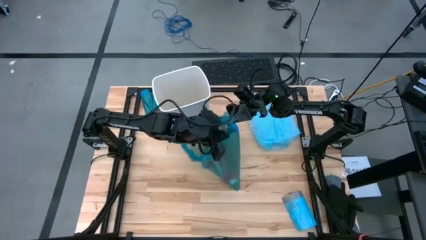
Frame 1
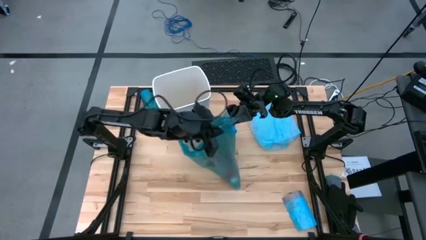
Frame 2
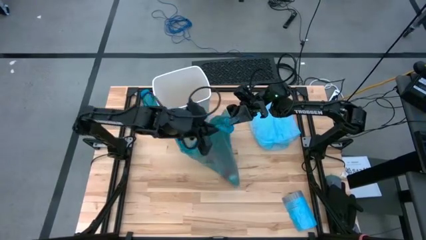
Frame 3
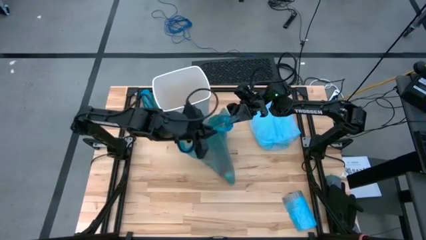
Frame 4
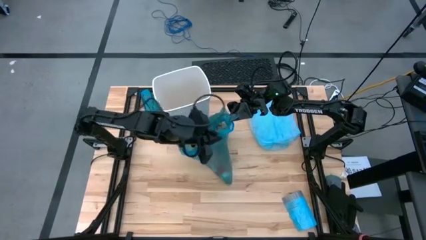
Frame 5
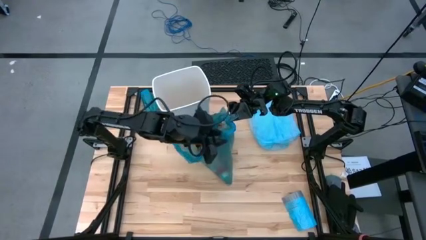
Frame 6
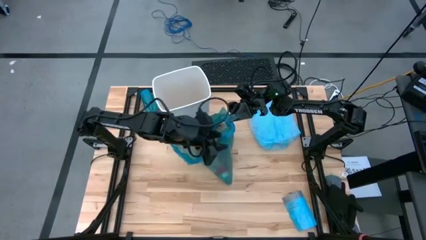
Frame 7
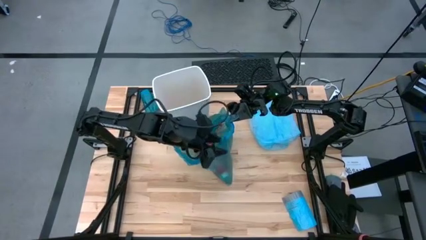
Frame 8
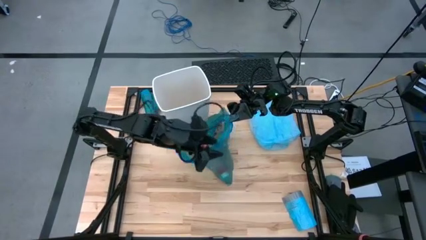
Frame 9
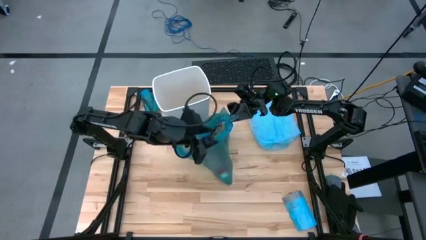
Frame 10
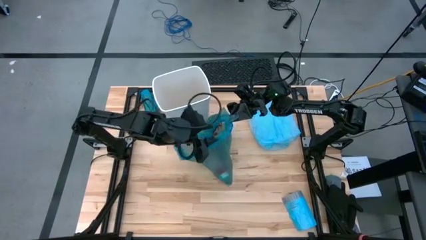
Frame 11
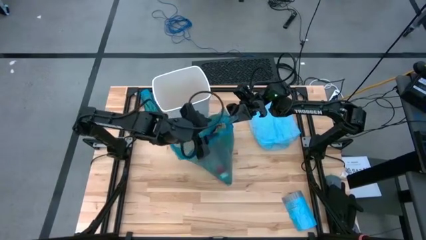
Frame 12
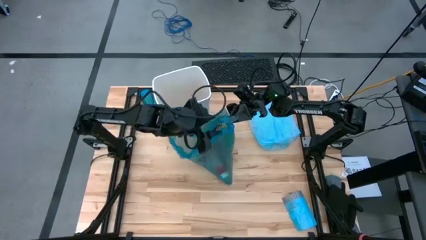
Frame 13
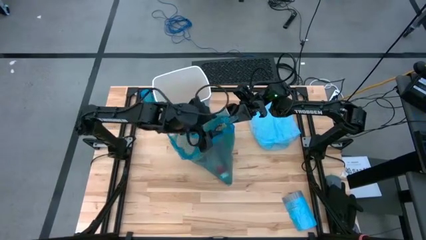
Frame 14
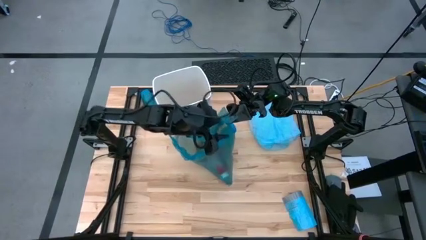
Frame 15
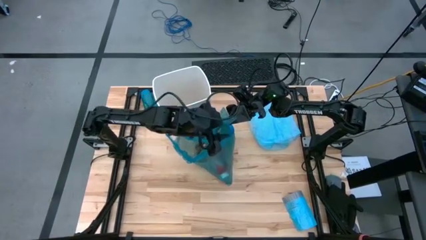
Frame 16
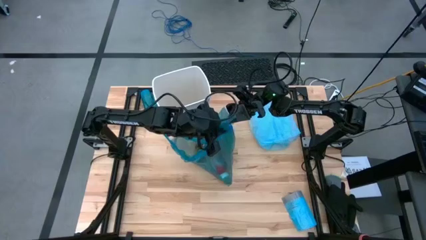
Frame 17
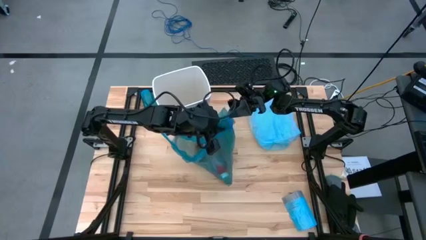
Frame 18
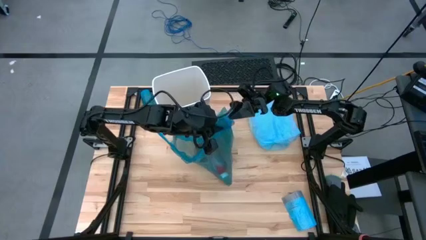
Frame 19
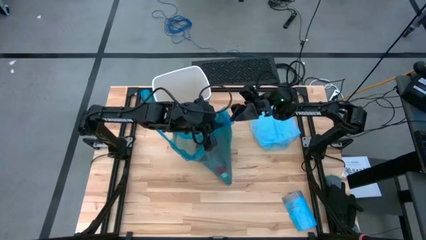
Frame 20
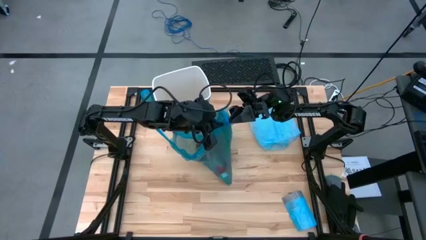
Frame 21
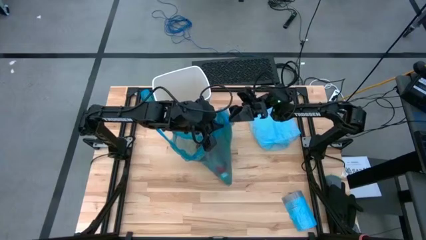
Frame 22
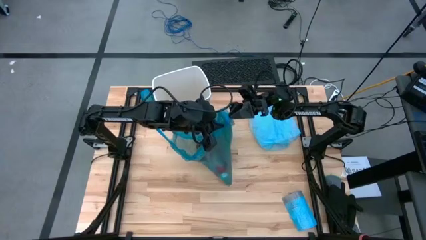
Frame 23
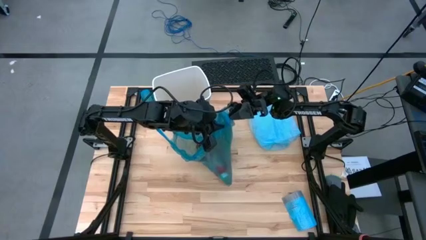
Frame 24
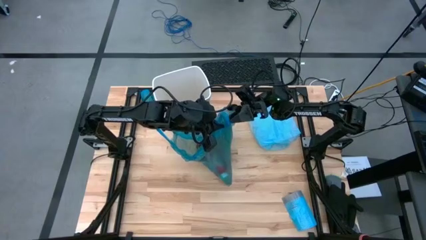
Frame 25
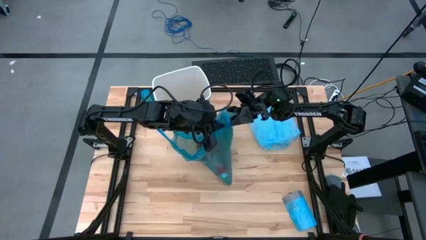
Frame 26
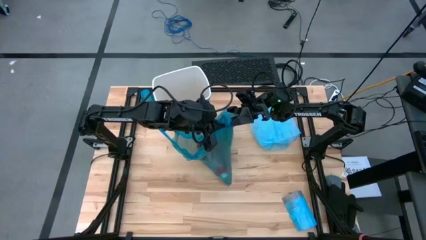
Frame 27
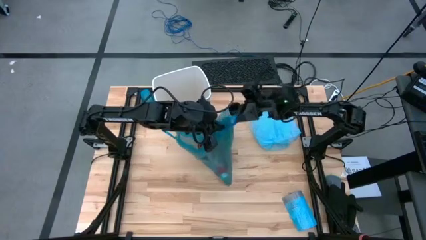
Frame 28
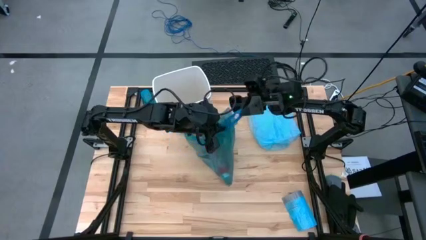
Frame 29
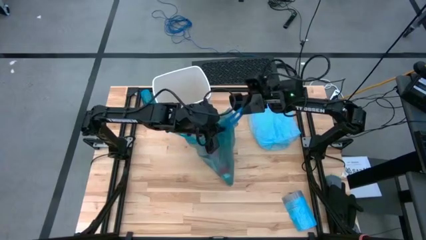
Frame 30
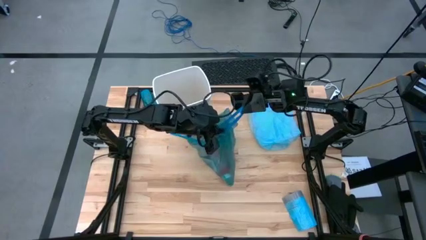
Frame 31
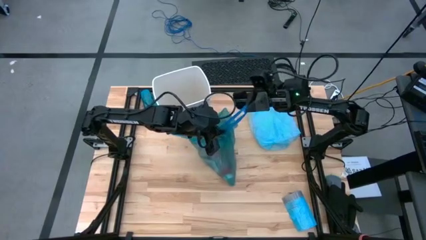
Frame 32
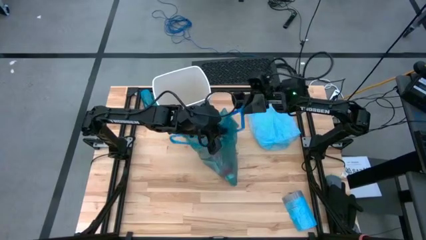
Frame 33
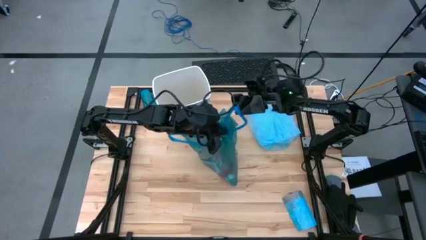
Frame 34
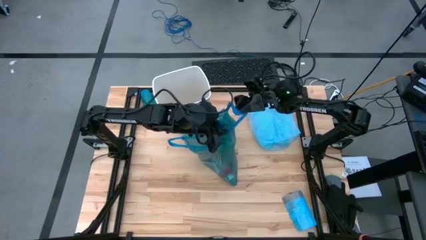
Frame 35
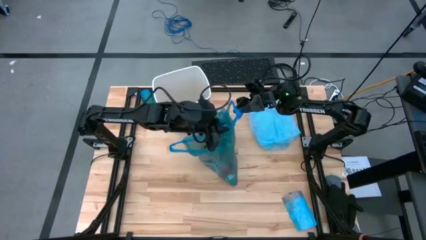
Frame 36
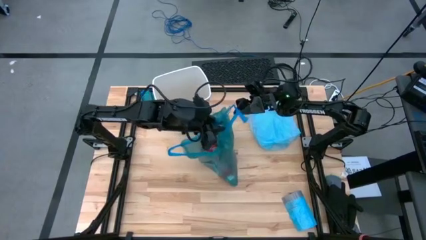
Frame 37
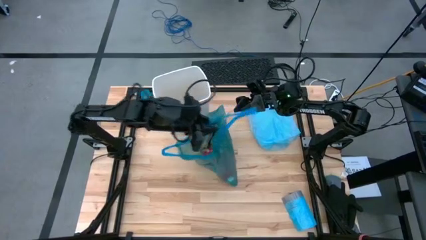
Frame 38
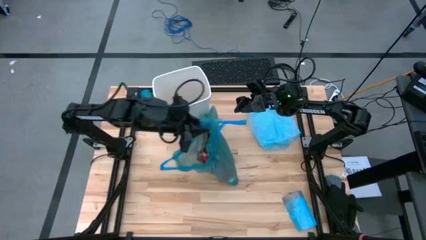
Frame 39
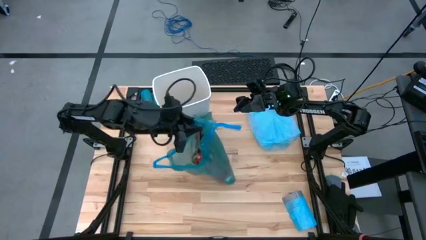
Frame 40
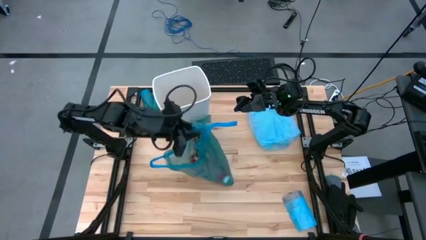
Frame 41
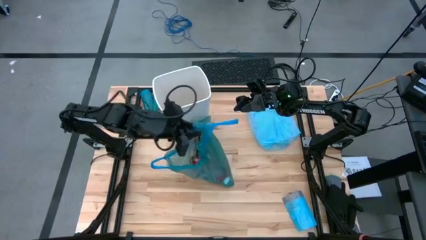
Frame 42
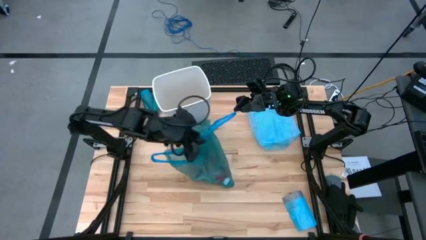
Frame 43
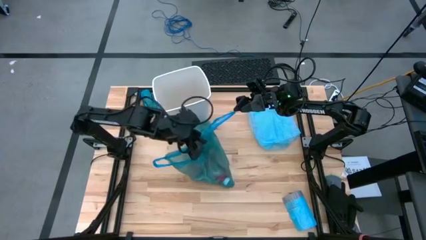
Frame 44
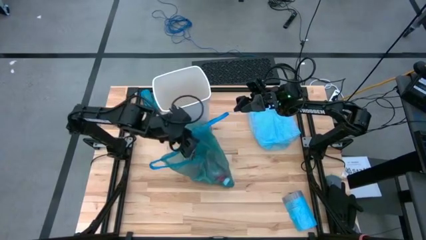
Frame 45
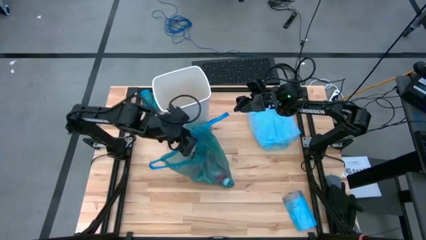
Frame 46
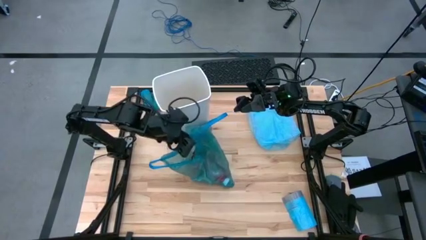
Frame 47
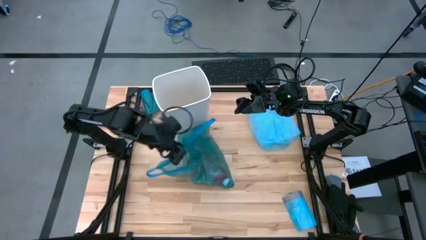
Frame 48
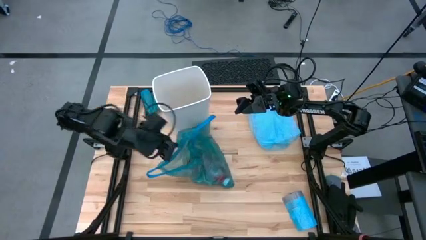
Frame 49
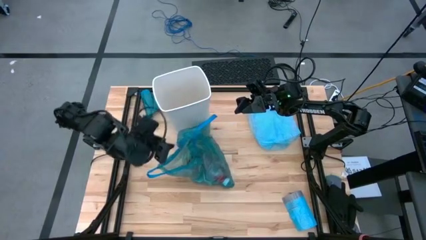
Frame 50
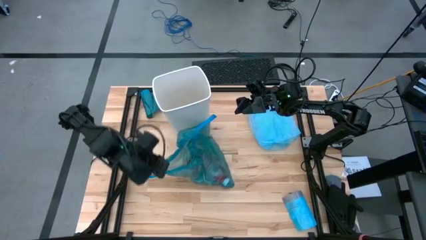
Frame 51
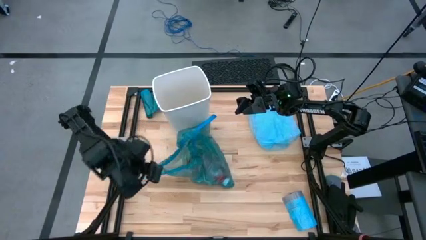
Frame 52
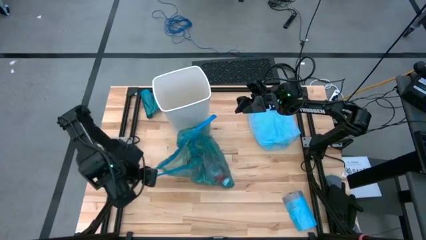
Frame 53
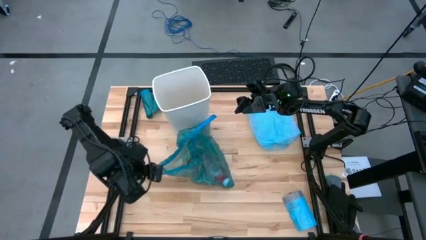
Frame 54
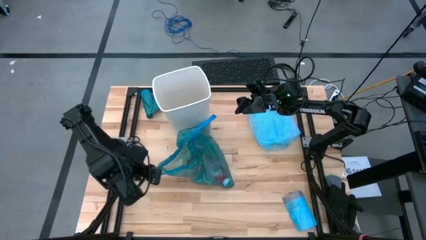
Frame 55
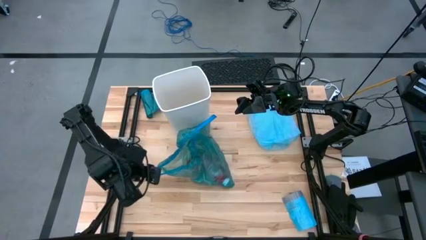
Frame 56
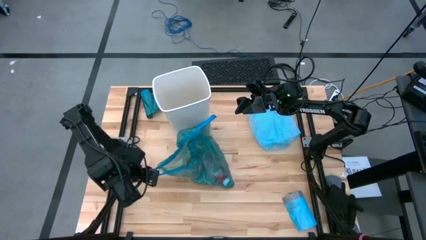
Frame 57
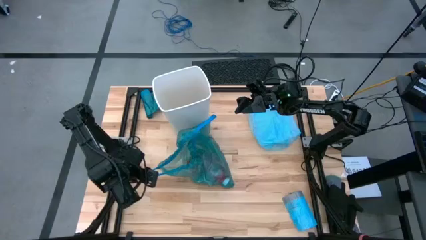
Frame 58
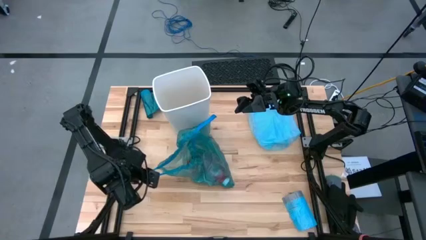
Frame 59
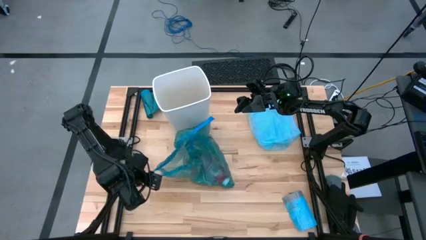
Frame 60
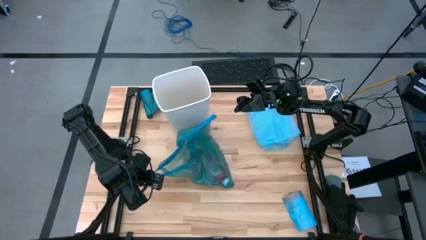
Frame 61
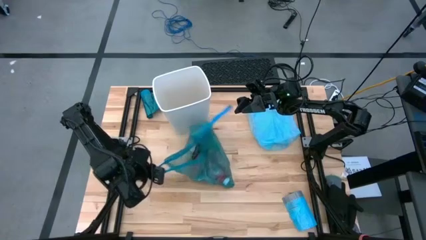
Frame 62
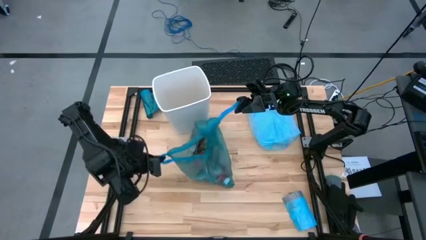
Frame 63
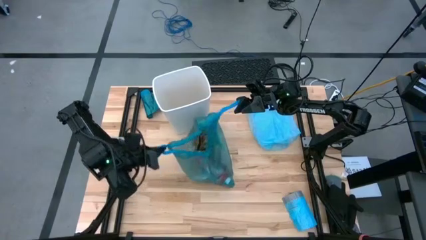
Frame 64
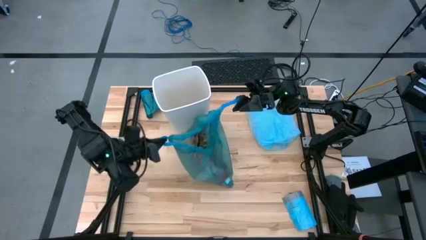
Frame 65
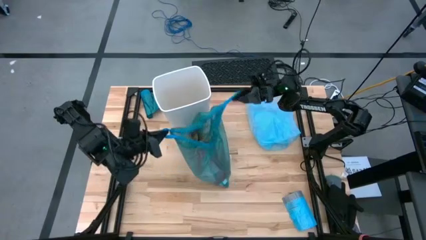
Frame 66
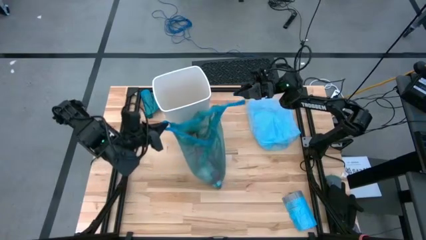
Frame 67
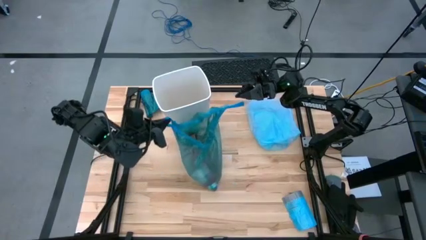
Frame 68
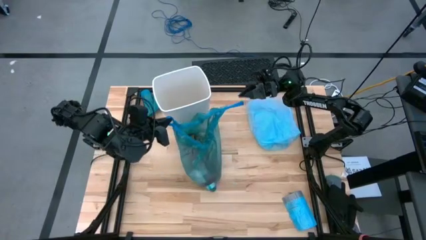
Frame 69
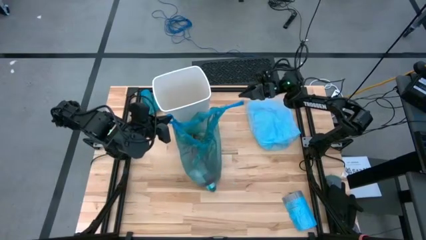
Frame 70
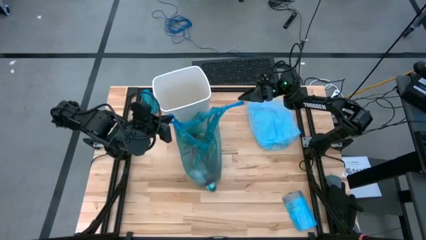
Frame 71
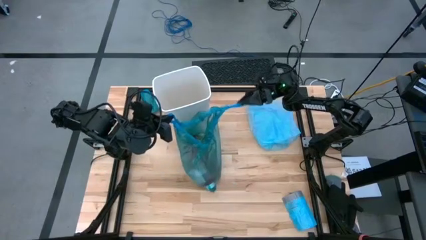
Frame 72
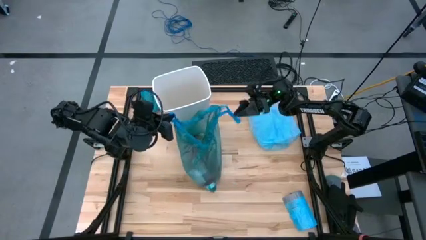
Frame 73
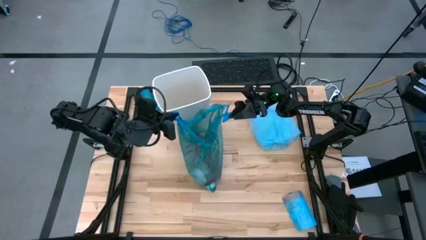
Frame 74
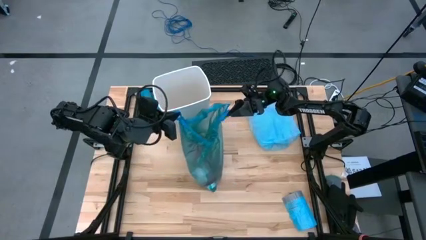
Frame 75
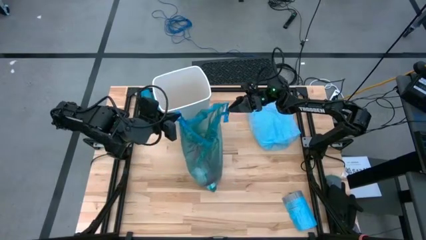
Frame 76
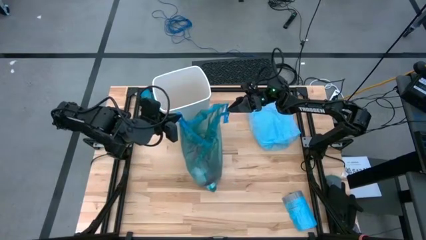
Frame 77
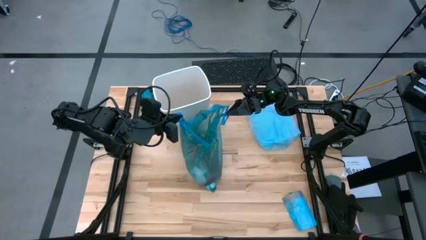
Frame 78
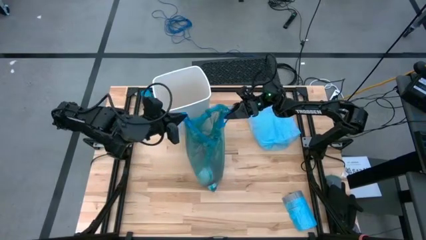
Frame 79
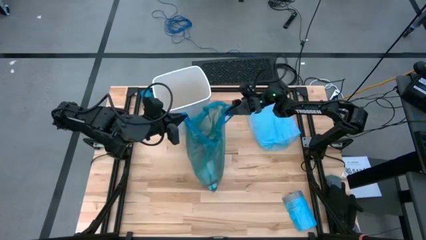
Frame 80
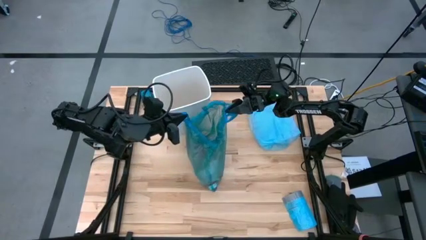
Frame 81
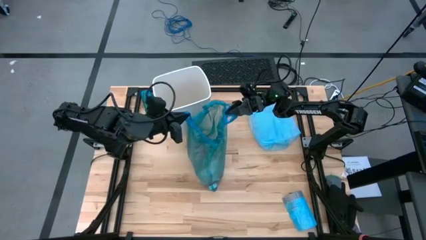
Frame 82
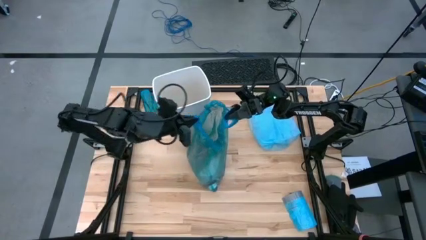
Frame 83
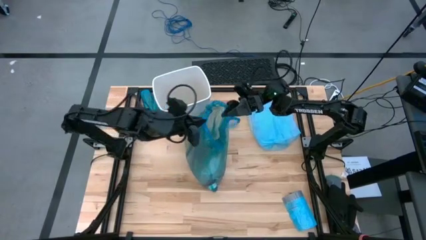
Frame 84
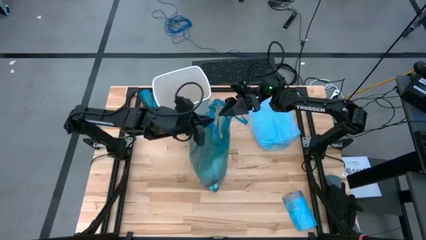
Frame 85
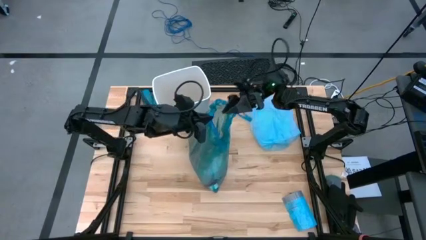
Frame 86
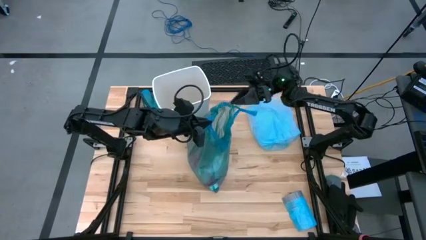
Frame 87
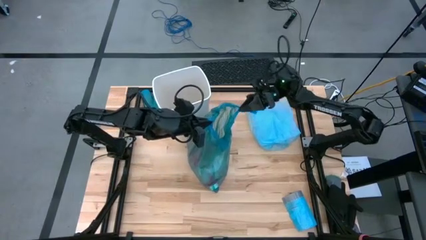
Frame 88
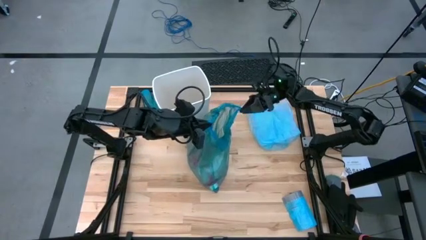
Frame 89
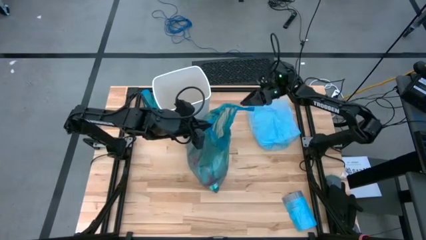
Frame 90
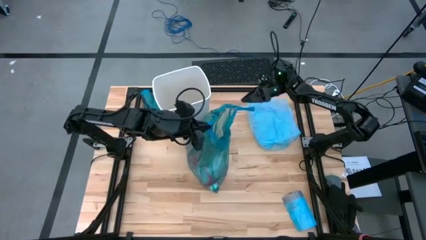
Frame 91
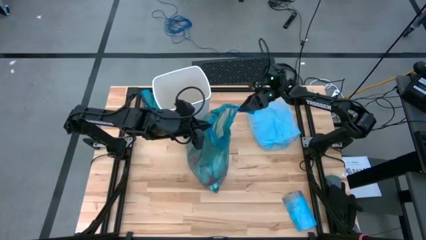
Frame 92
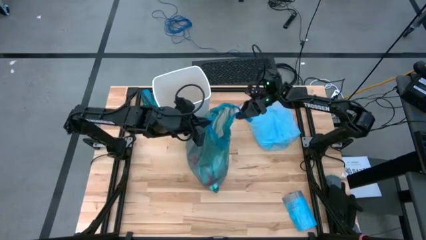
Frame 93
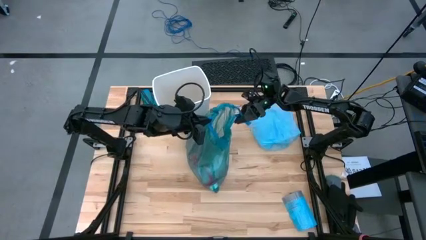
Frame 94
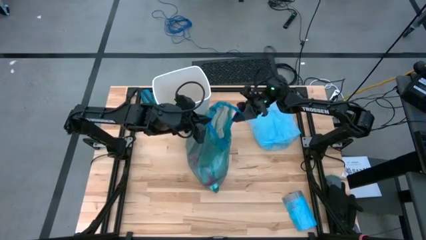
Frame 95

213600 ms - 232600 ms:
Task: place trash/remove bag and relplace
Close the blue trash bag
